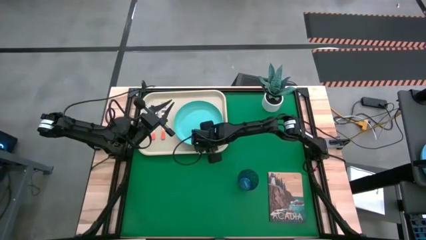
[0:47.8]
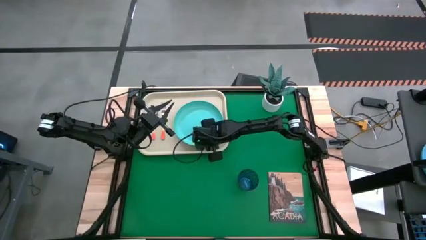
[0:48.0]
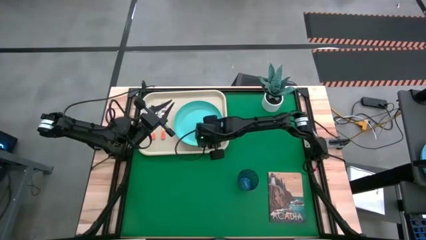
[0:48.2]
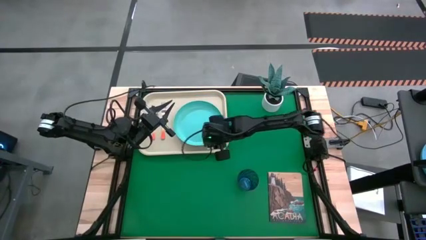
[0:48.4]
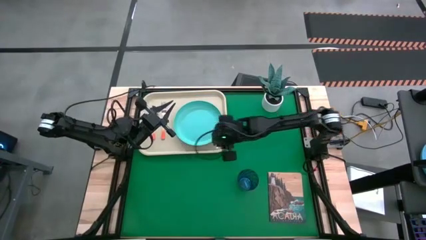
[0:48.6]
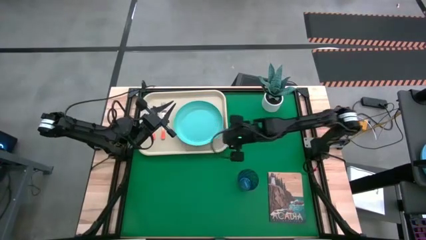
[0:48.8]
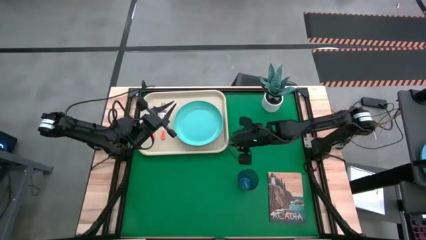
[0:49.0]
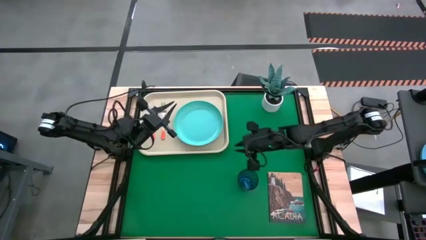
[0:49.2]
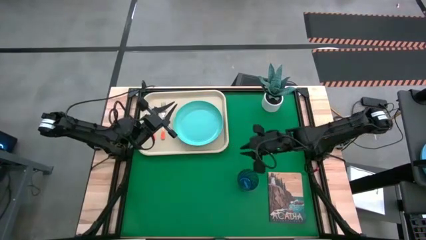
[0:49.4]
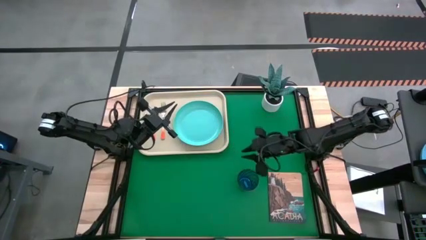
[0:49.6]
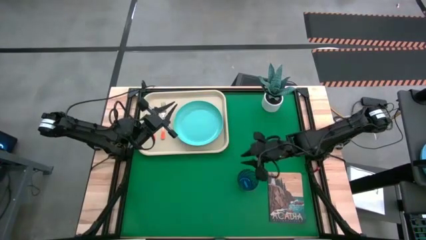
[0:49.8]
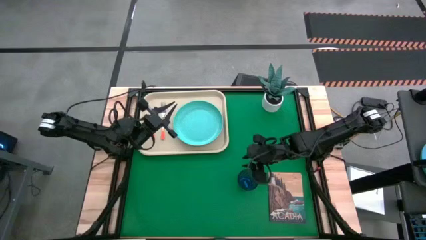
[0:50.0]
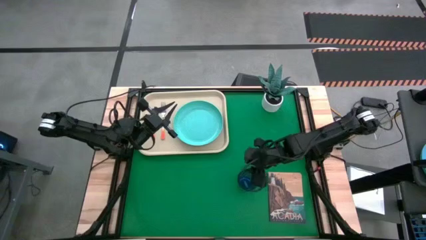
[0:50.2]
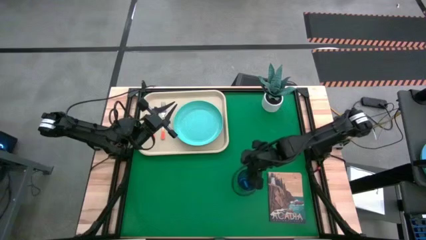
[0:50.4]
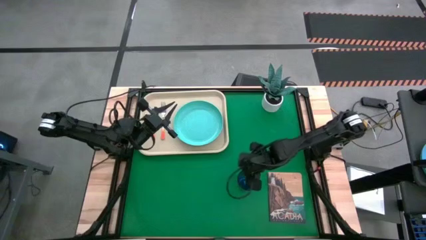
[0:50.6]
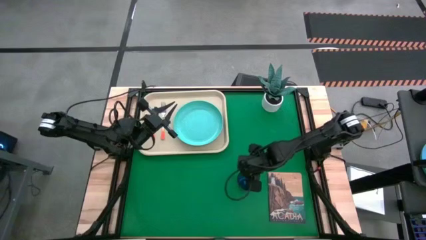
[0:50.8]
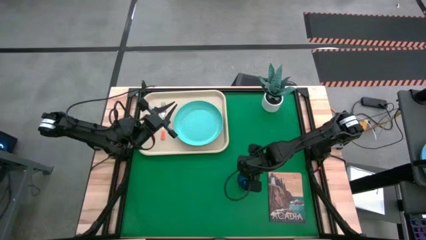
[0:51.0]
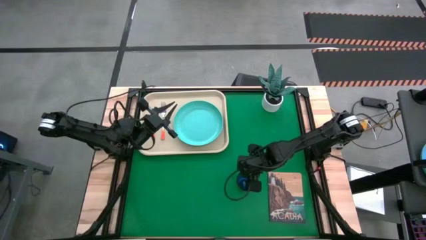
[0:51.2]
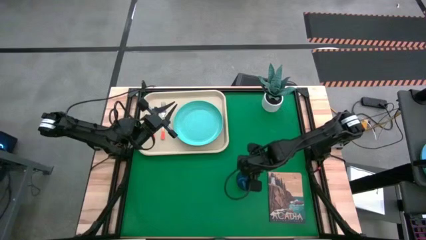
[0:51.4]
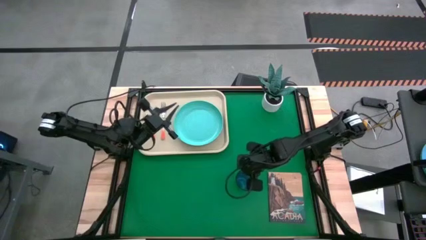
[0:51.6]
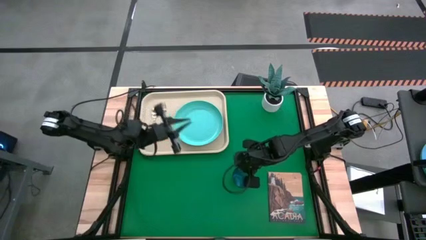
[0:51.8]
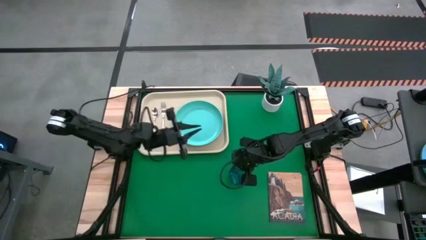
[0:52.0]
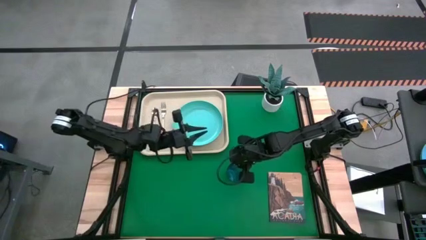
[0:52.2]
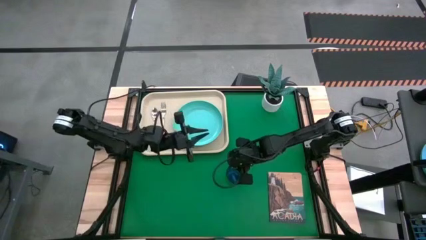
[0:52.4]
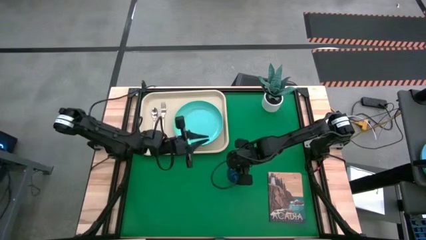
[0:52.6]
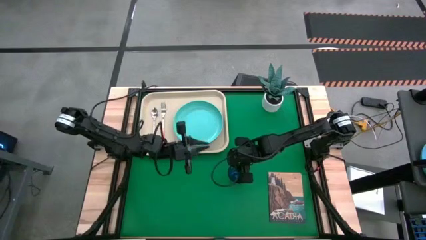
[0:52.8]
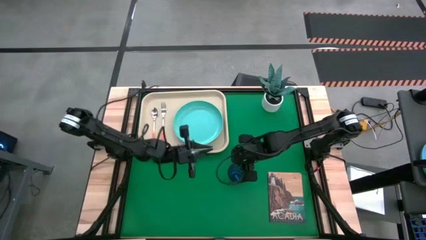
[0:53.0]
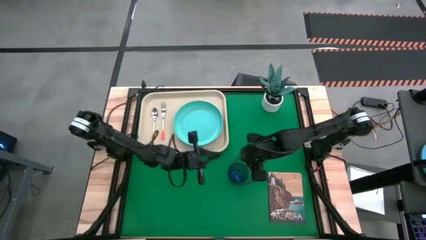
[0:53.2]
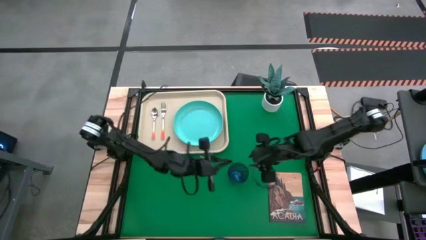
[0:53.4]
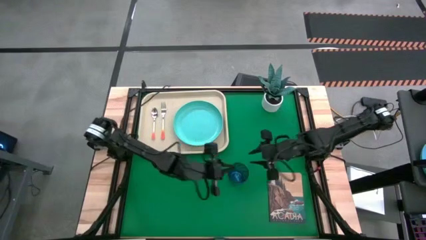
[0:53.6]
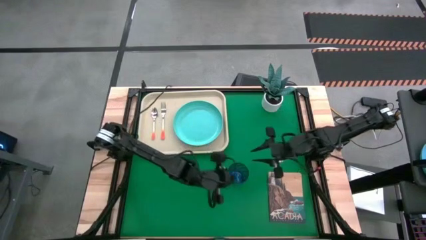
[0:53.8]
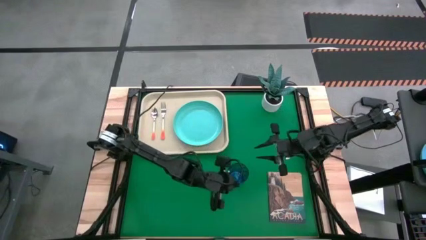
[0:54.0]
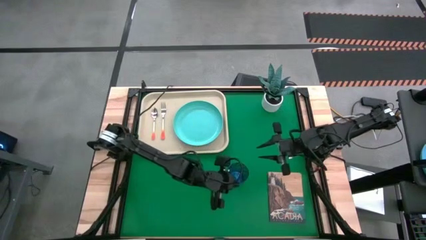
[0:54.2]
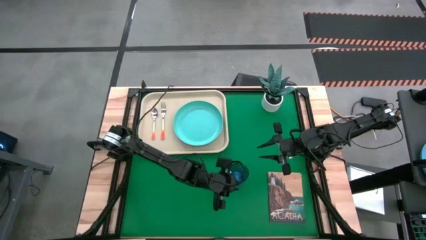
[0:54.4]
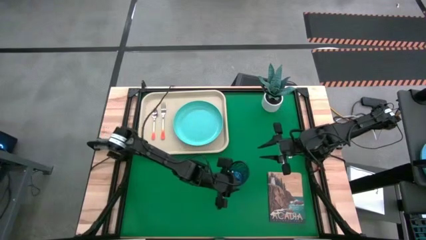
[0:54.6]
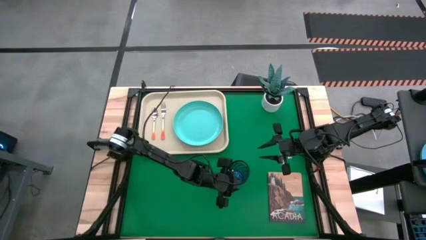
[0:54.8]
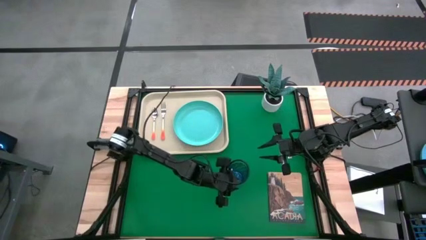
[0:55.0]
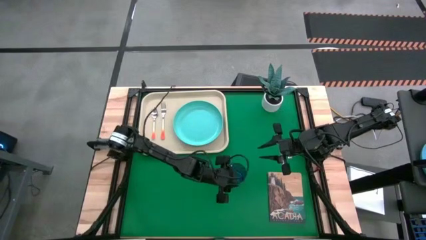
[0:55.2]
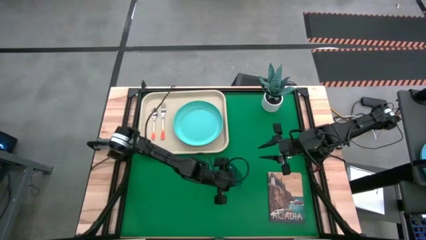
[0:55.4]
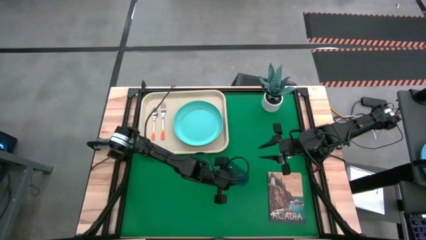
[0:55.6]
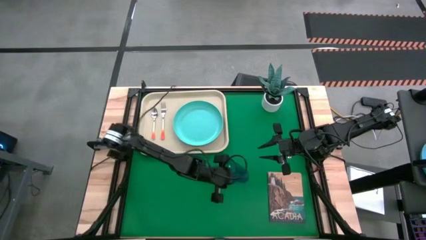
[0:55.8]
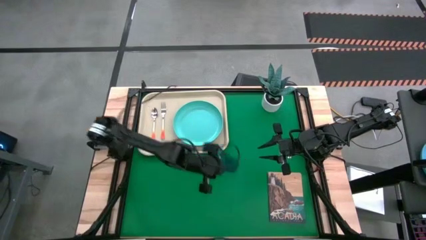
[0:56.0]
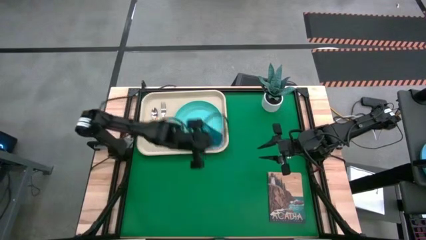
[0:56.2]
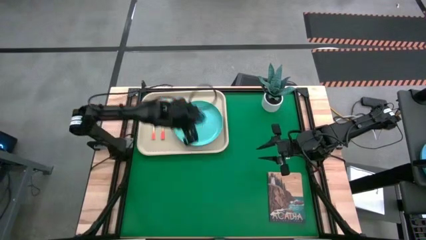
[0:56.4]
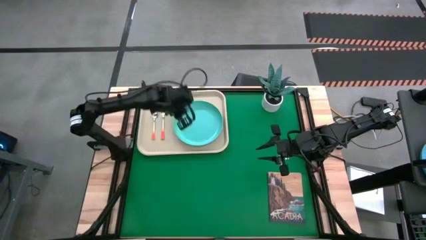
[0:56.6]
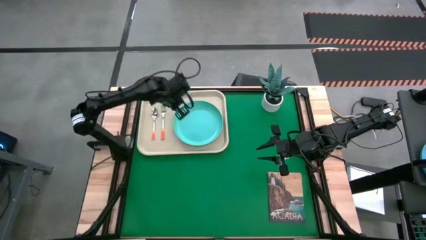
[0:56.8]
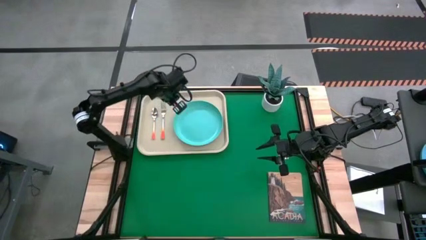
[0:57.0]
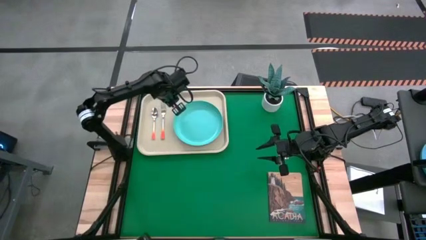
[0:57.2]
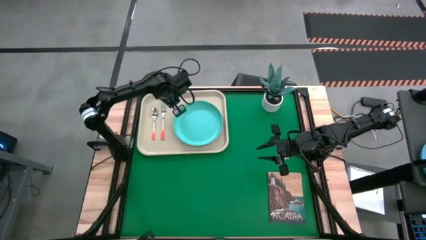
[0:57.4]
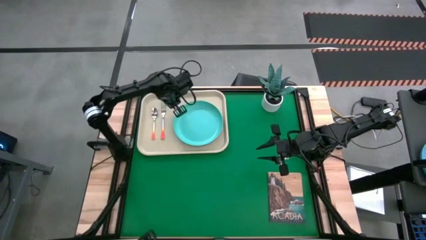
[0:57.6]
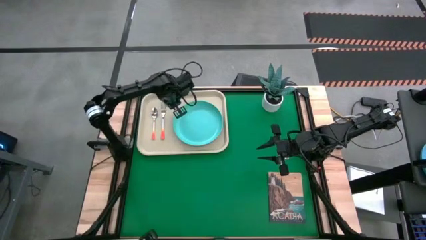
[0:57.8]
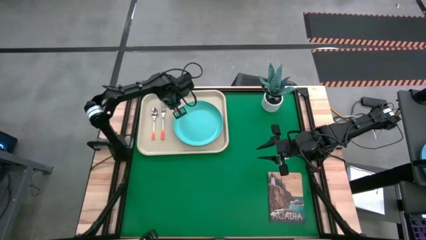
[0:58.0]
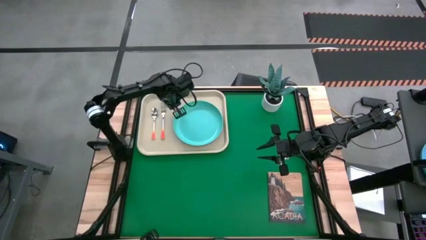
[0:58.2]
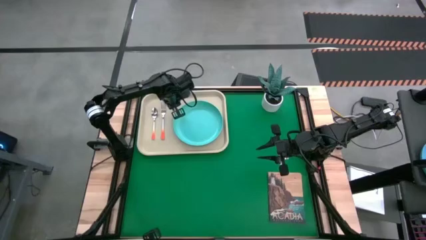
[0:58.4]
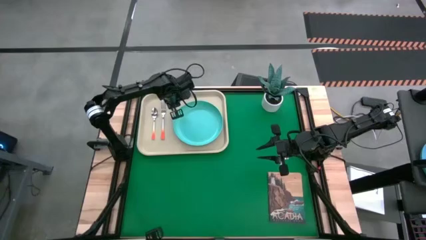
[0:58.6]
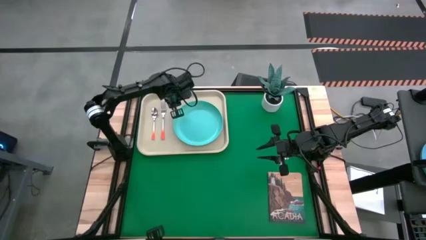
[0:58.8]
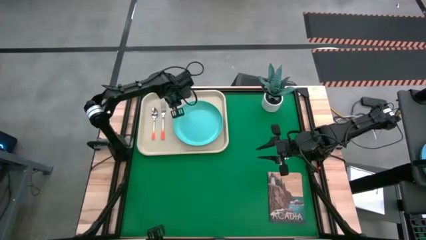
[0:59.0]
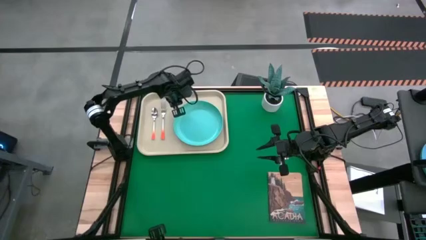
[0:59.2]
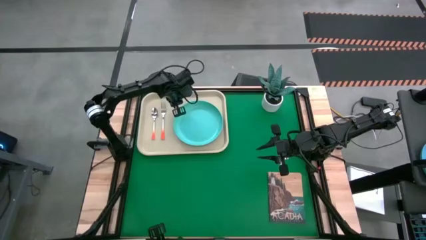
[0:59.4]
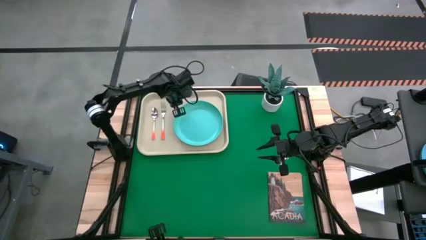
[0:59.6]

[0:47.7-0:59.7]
Task: Pick and place plate/cup/fork/spoon on tray
Put the blue cup on the white tray to the top left of the blue plate
